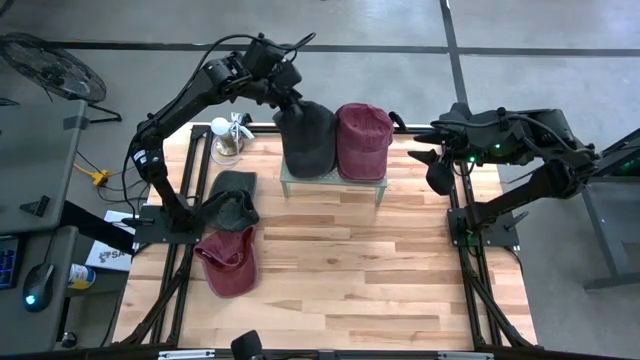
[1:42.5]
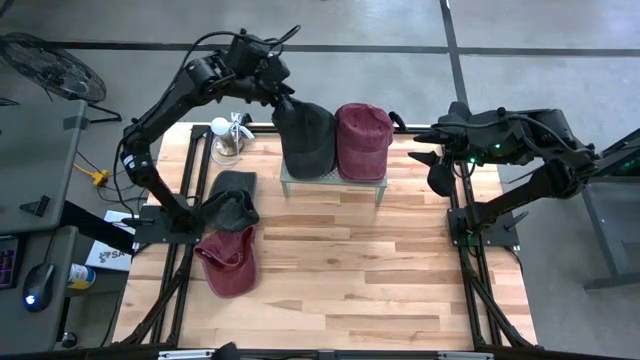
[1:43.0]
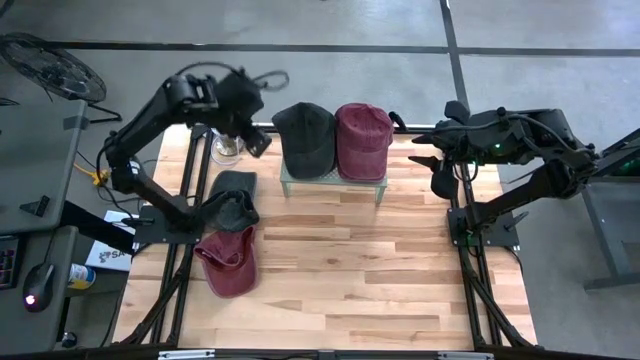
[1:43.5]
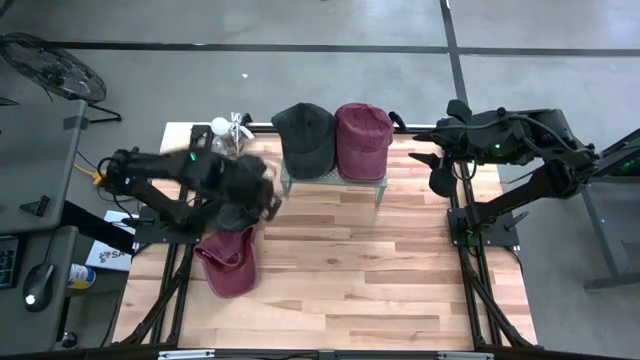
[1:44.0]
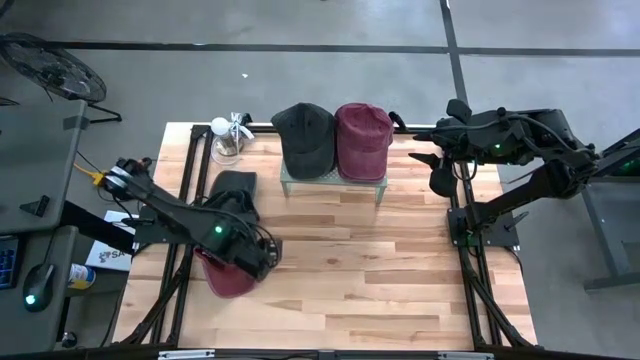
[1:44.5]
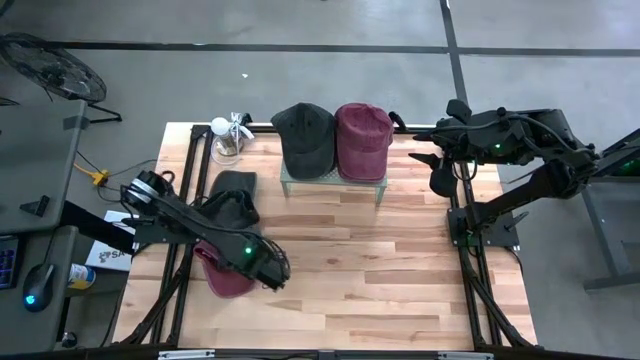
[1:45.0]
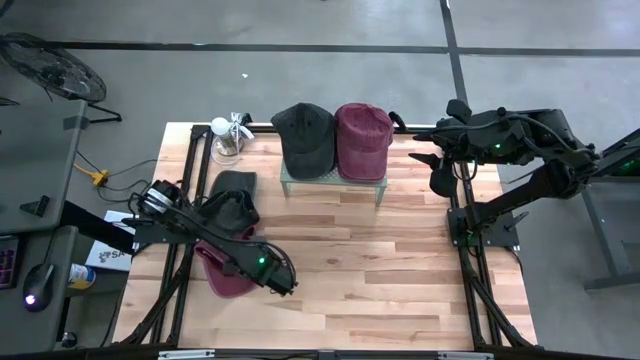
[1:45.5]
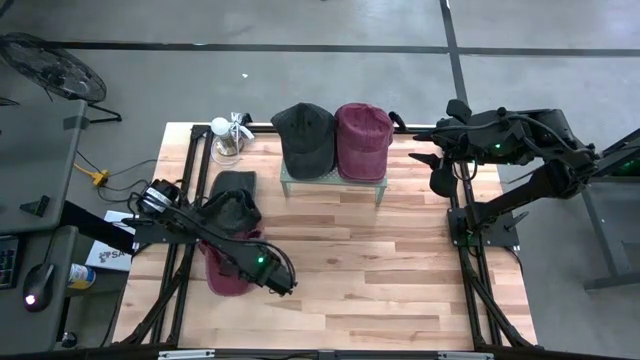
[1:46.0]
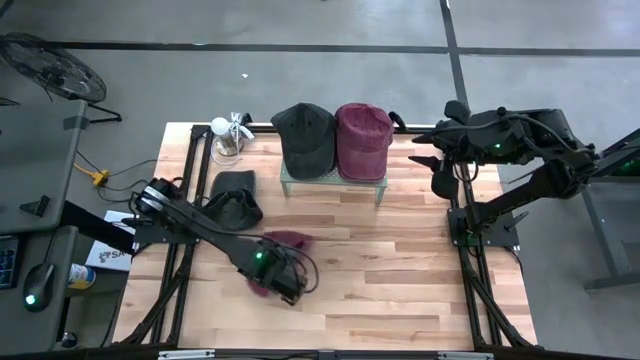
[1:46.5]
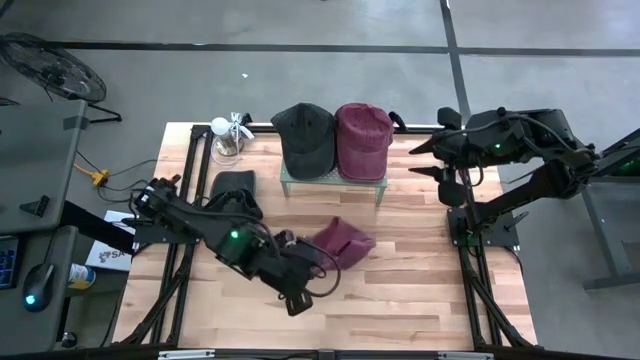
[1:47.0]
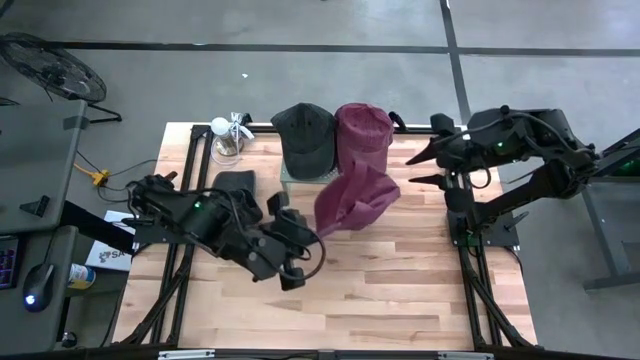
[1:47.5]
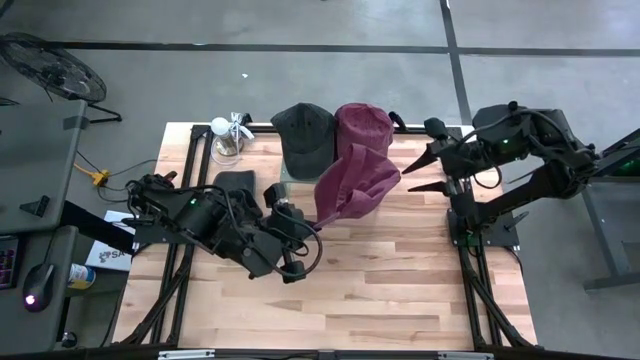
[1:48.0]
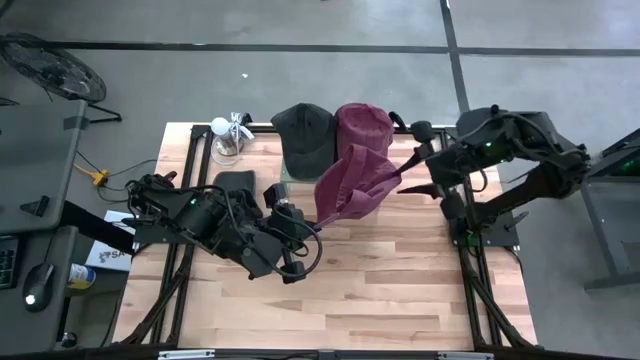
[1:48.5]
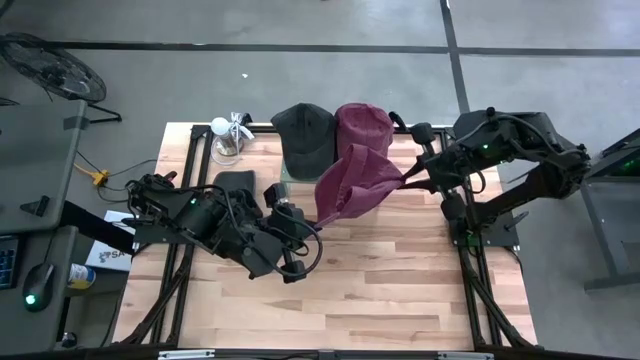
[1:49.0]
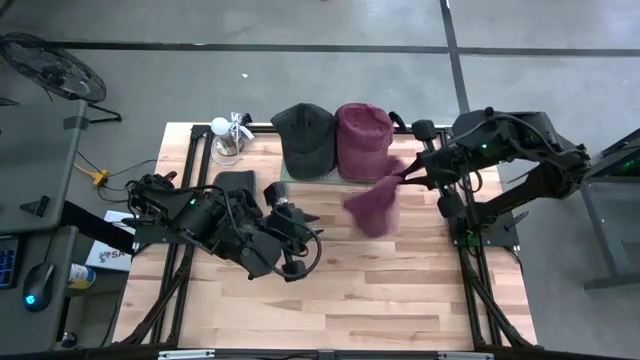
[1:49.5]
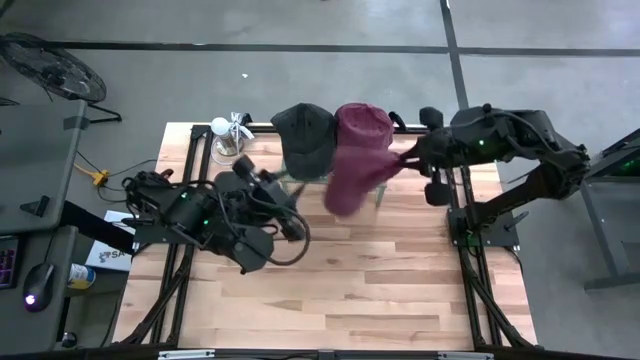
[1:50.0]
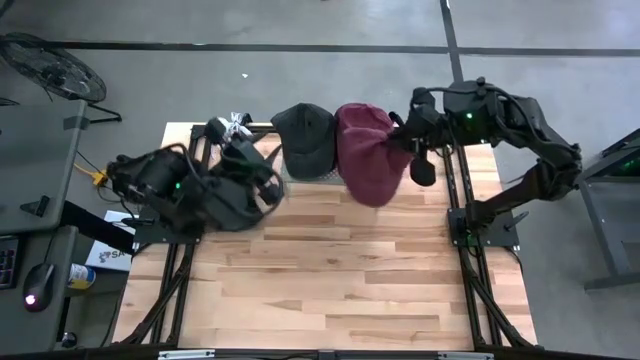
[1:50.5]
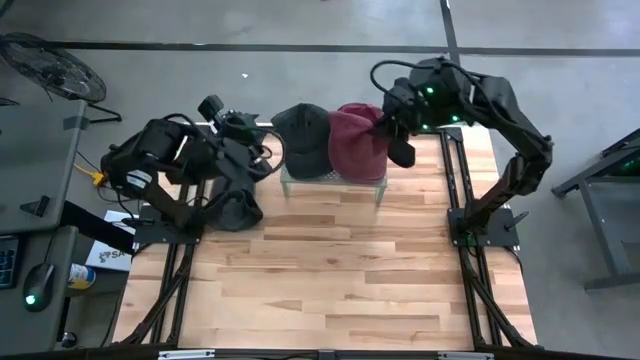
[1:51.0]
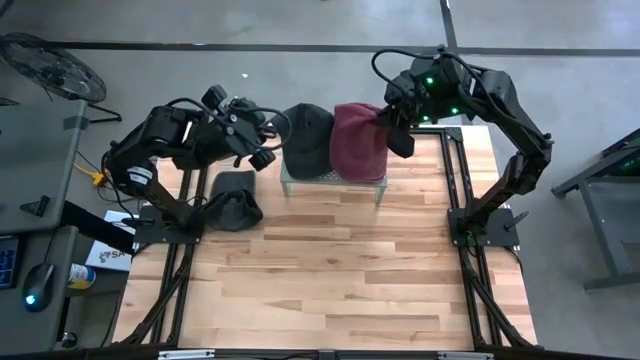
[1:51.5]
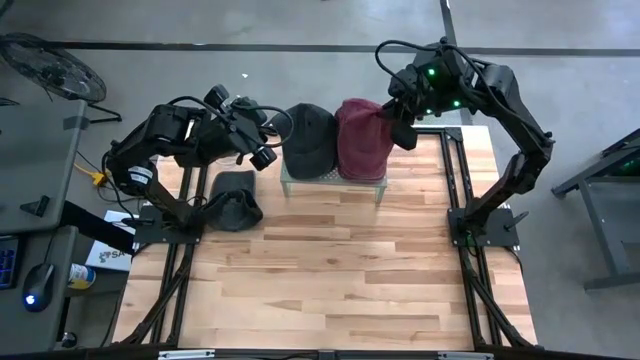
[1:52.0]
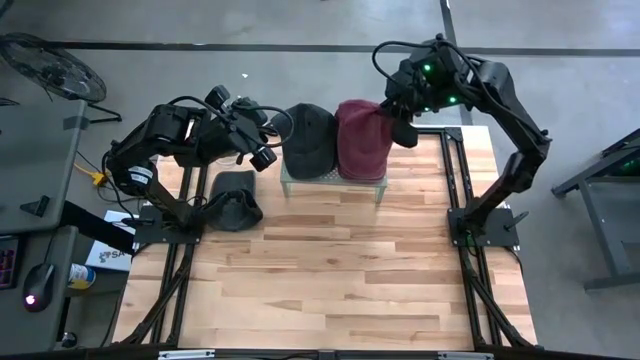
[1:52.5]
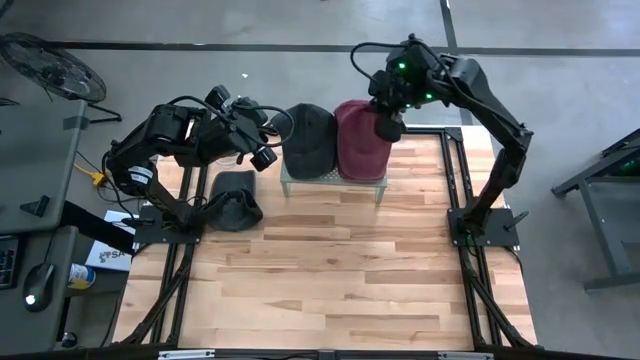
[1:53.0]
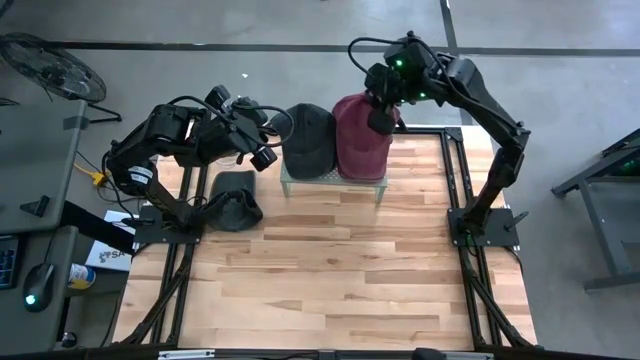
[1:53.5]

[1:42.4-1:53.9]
Task: Pick & Place hat
Stack the dark red cap on the other dark red caps on the shelf

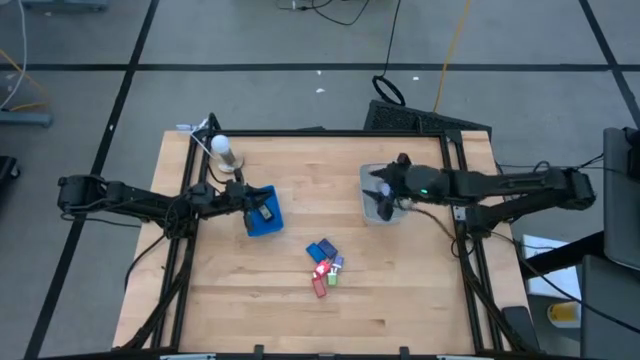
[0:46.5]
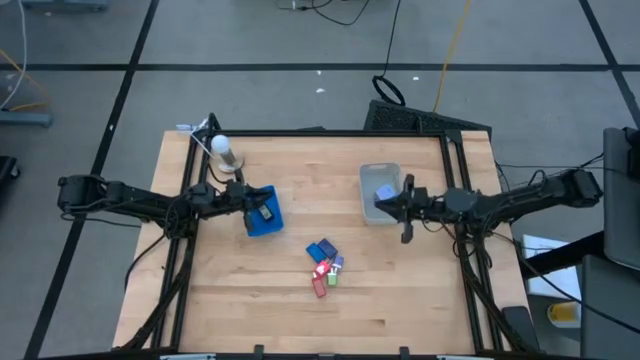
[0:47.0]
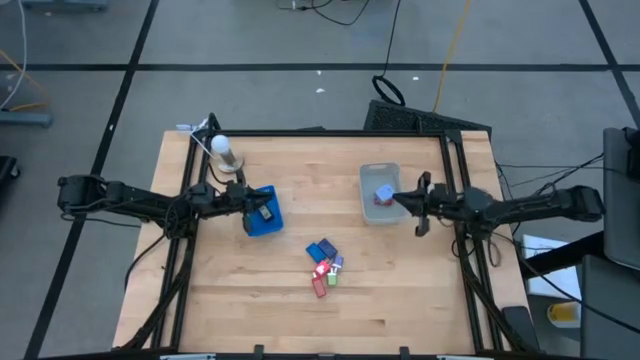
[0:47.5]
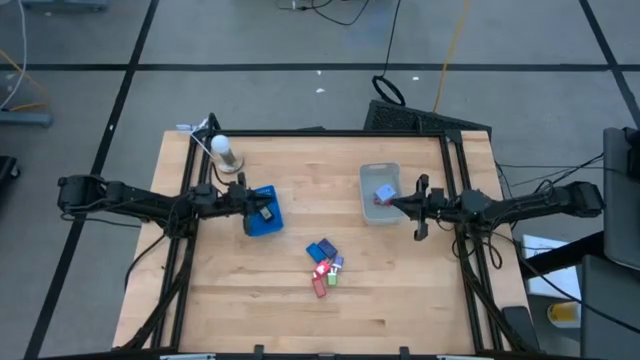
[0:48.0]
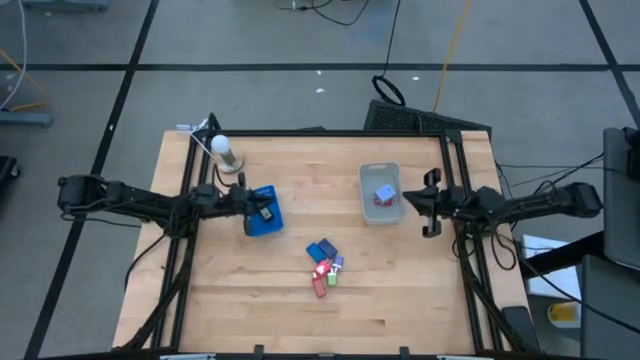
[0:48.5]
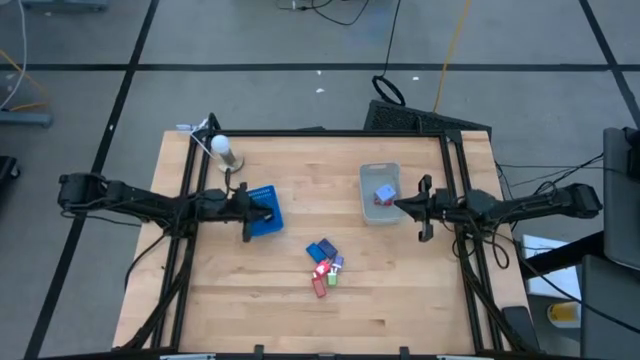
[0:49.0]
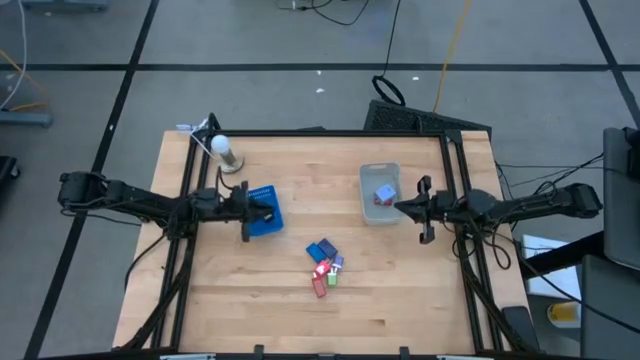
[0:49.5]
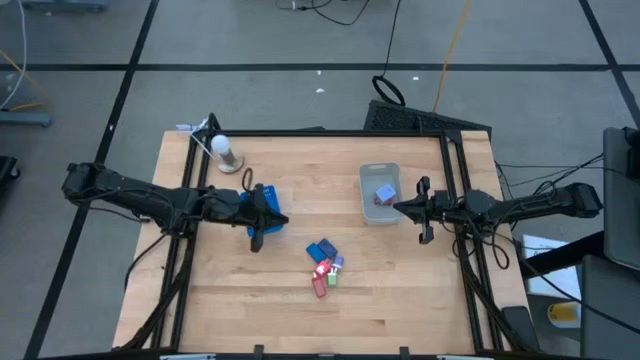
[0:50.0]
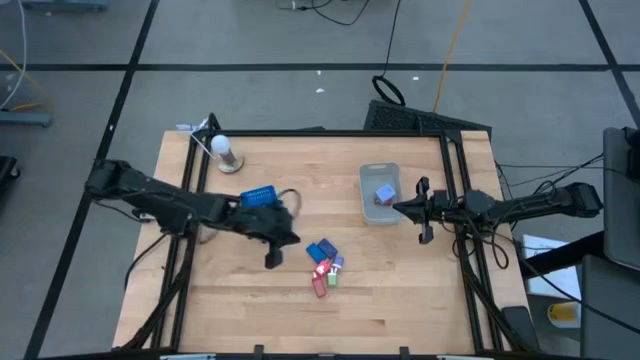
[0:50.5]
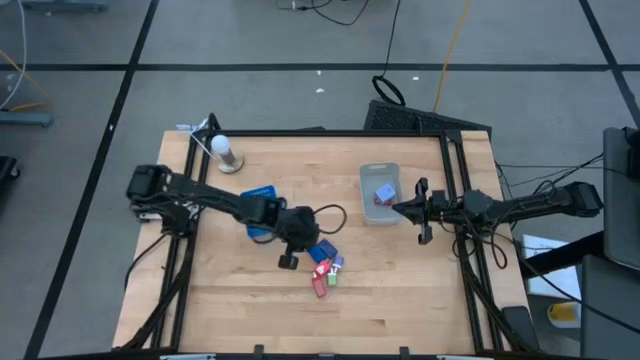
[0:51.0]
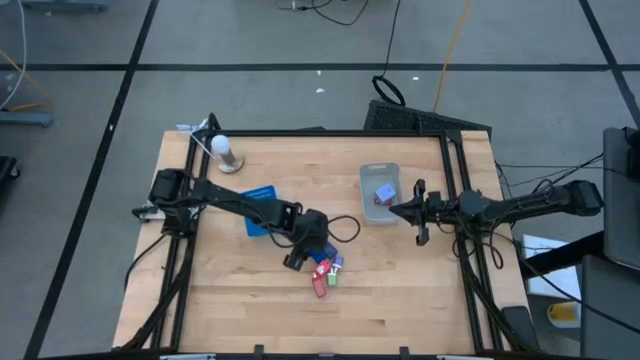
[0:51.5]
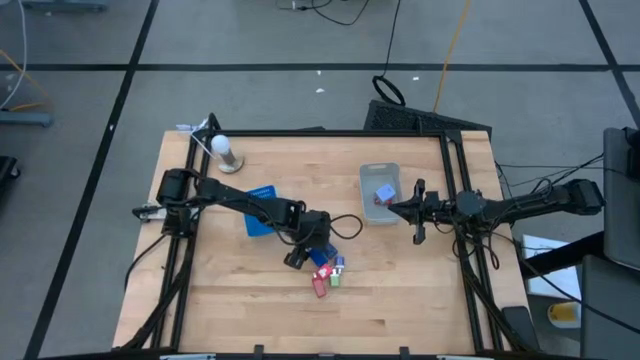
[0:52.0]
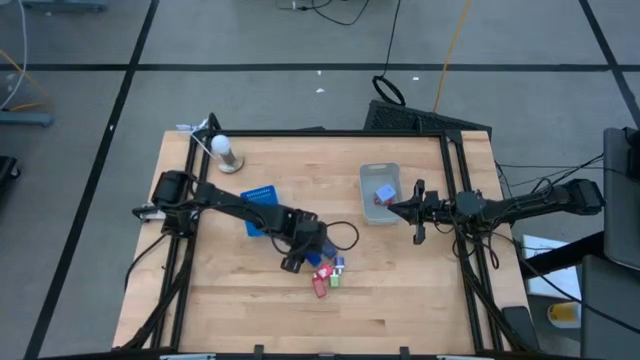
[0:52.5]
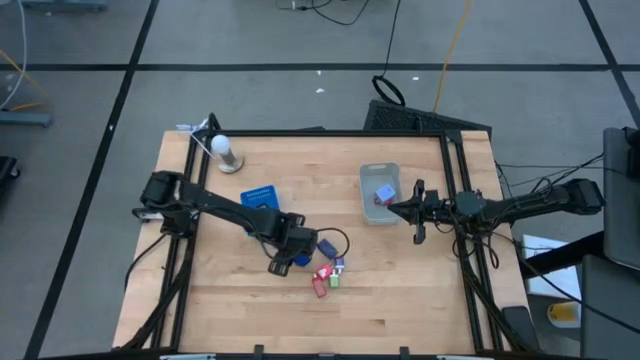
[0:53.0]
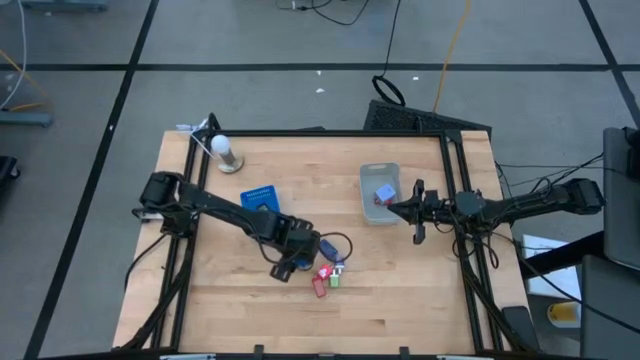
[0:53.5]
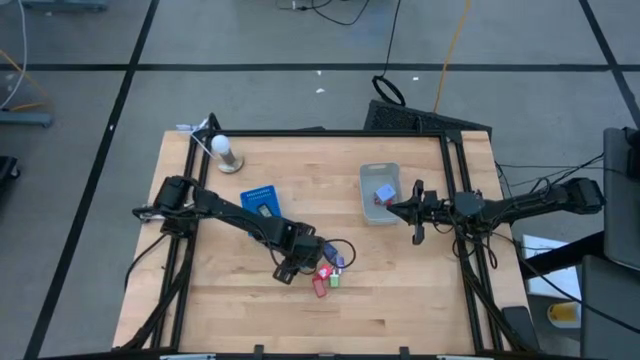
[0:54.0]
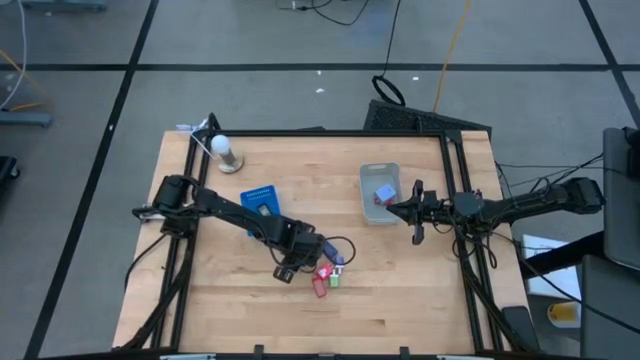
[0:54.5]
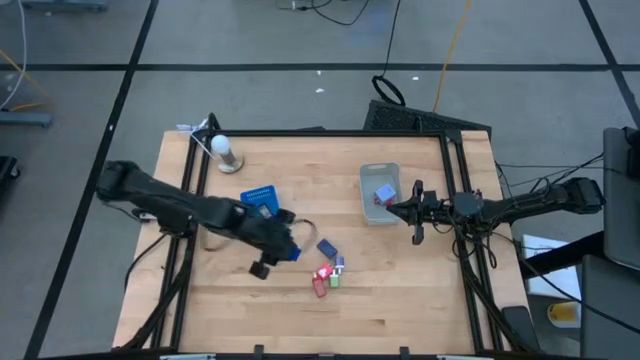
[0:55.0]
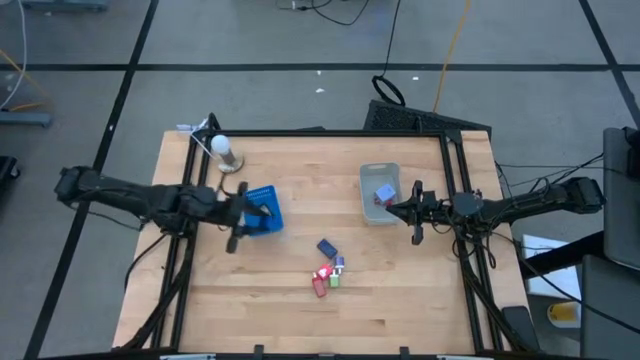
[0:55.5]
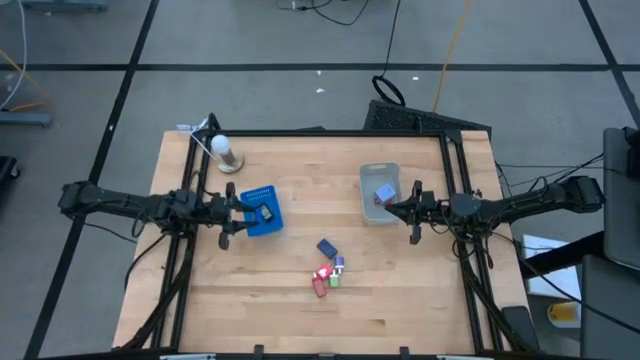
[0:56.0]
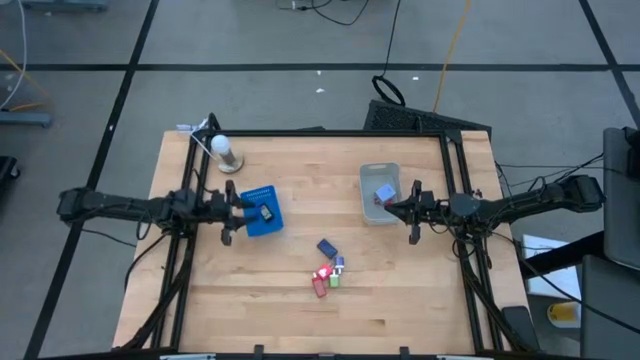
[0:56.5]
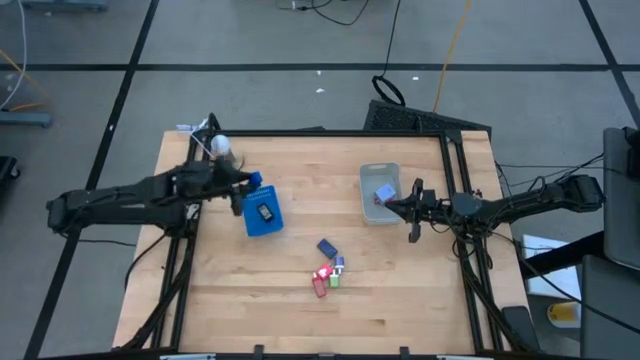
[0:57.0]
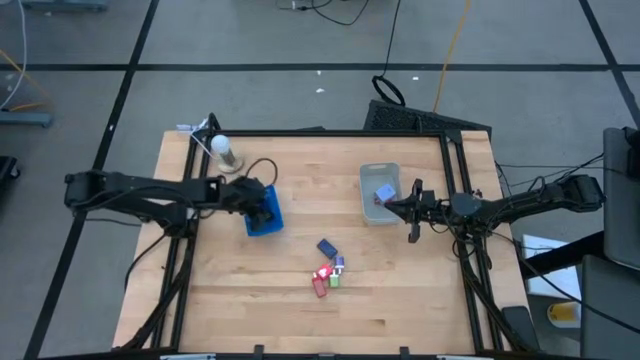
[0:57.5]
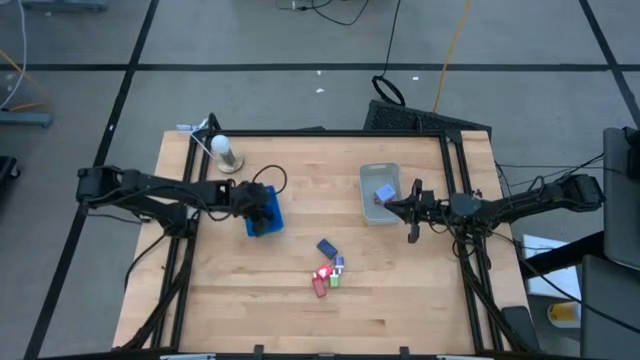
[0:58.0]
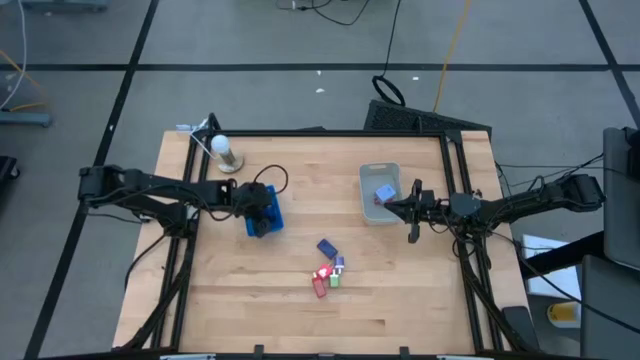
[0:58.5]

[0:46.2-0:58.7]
Task: Pick & Place Office items
Put the left blue digital timer into the blue bin
